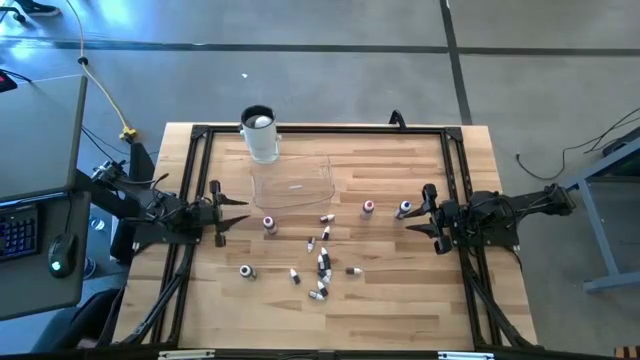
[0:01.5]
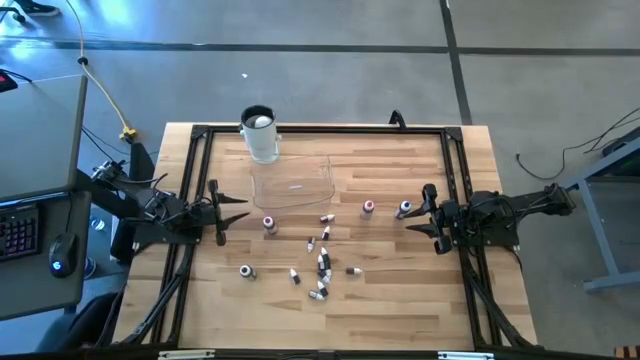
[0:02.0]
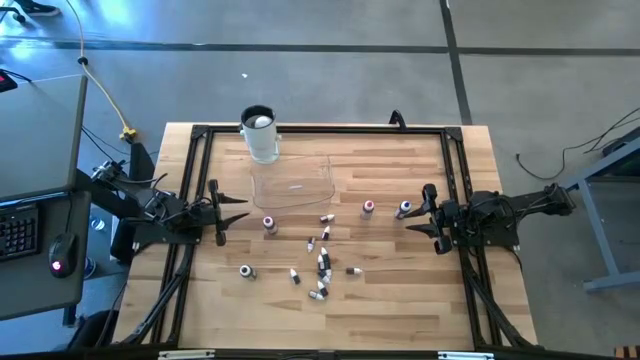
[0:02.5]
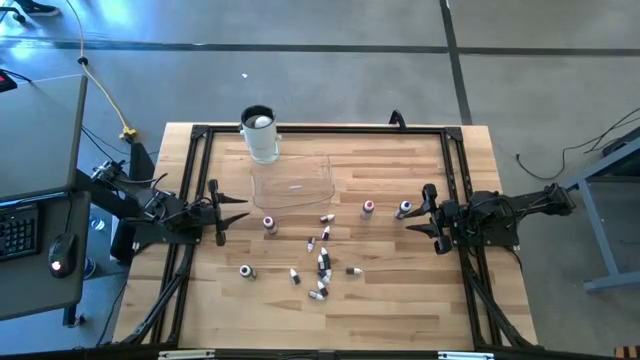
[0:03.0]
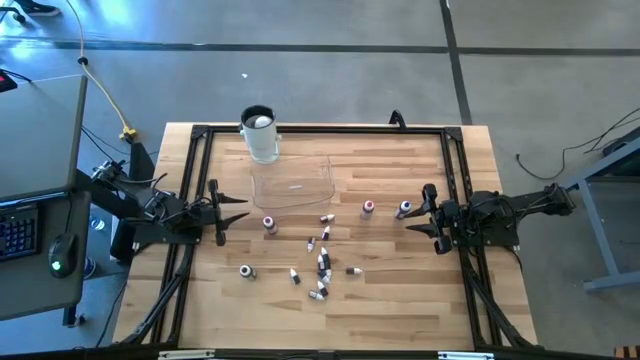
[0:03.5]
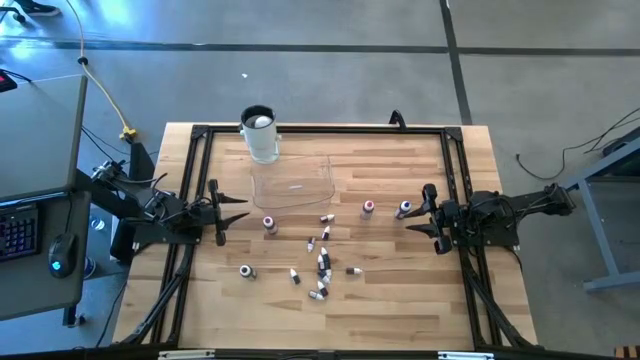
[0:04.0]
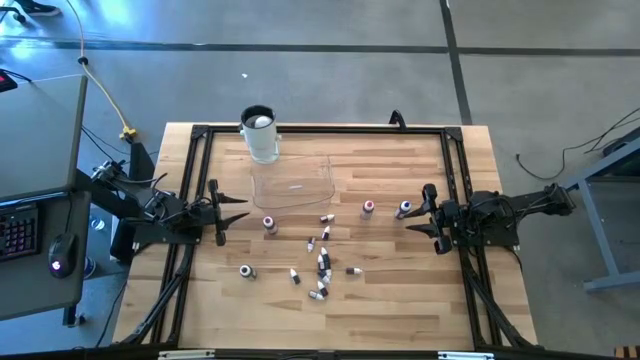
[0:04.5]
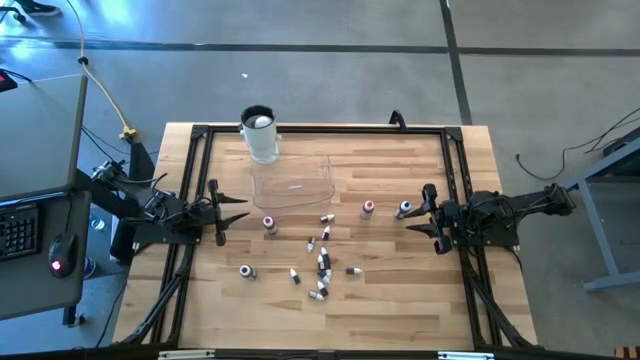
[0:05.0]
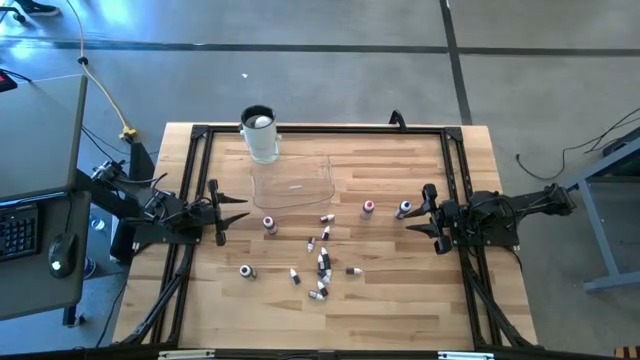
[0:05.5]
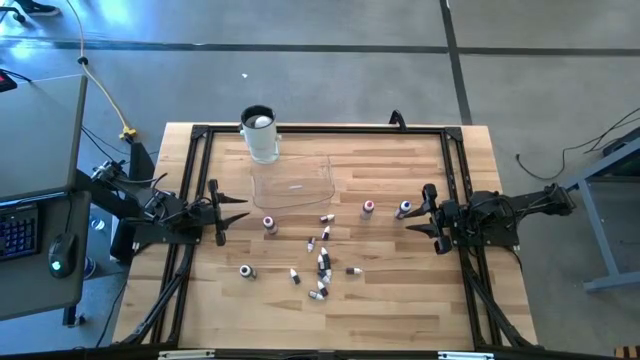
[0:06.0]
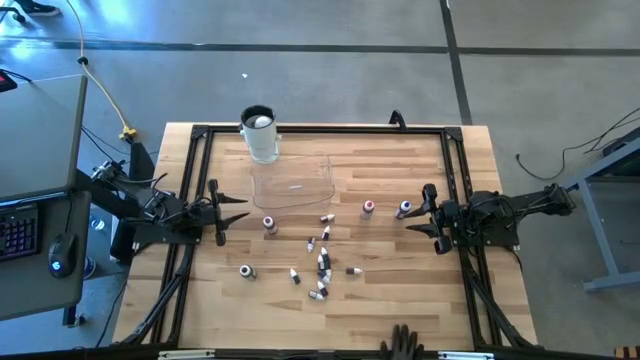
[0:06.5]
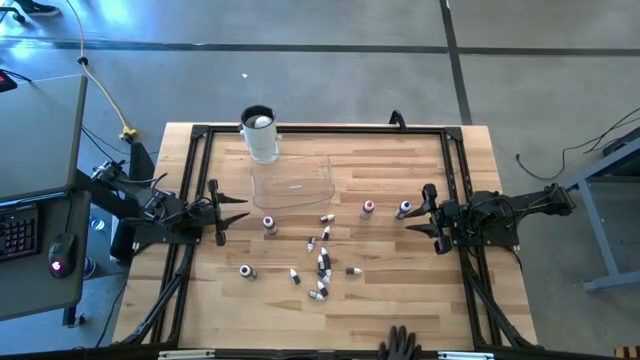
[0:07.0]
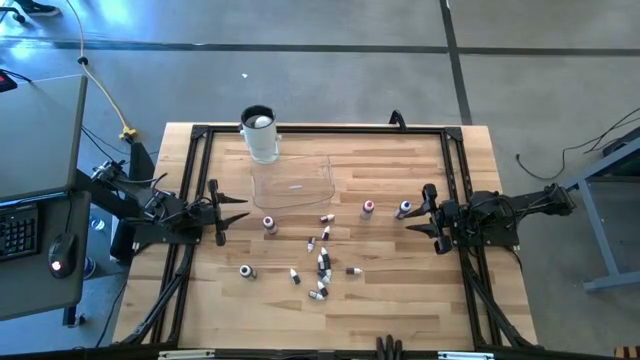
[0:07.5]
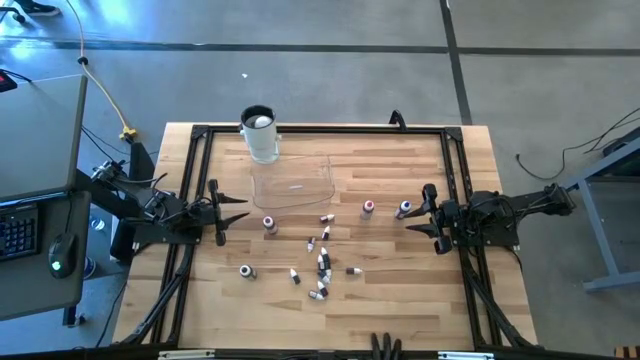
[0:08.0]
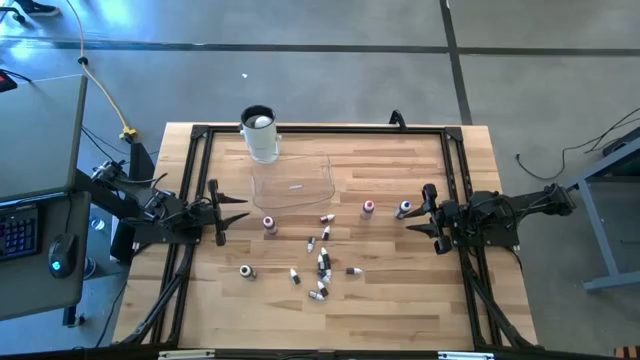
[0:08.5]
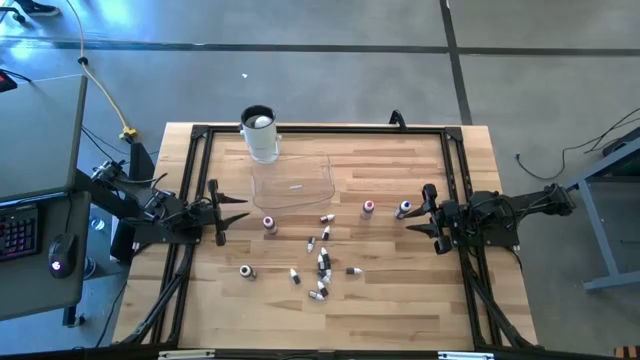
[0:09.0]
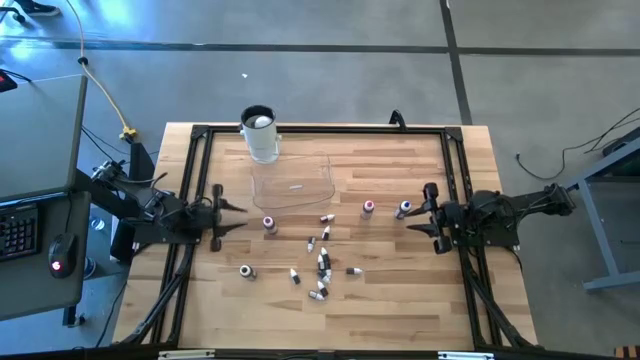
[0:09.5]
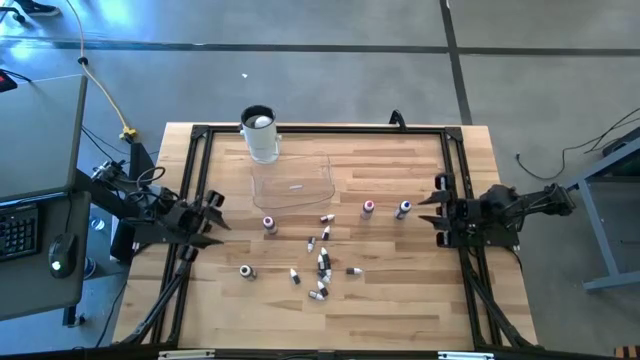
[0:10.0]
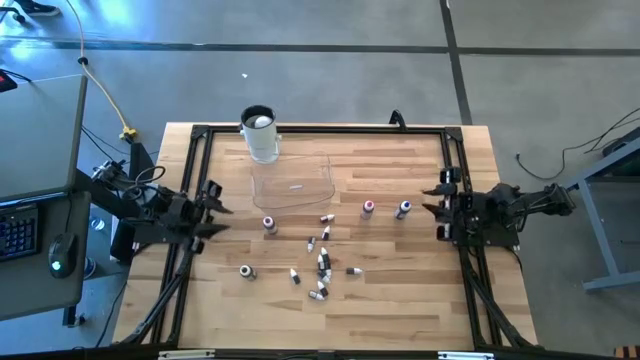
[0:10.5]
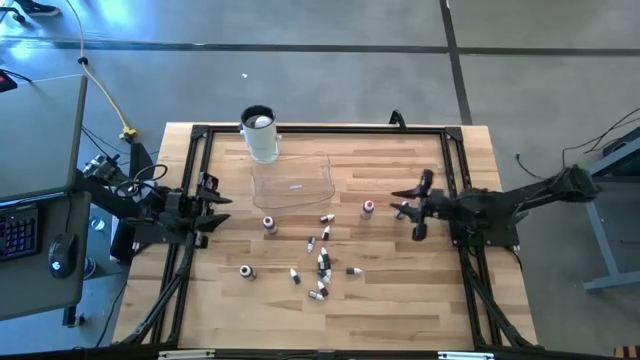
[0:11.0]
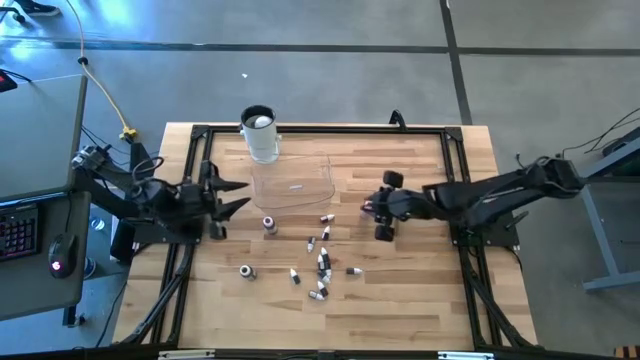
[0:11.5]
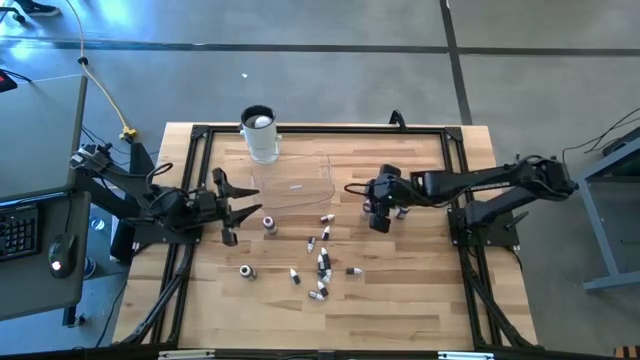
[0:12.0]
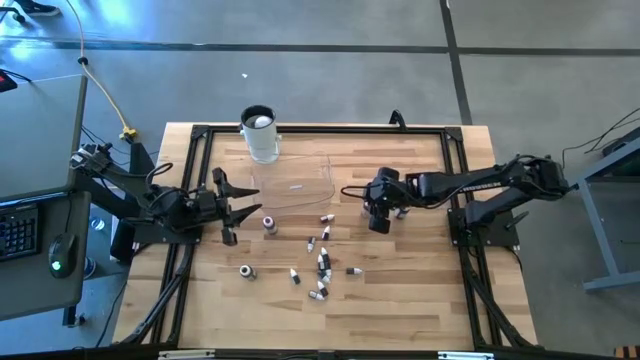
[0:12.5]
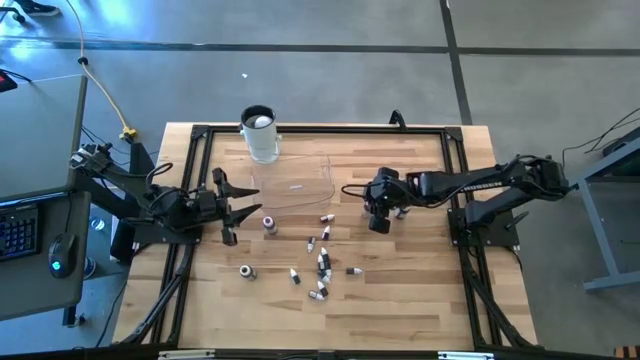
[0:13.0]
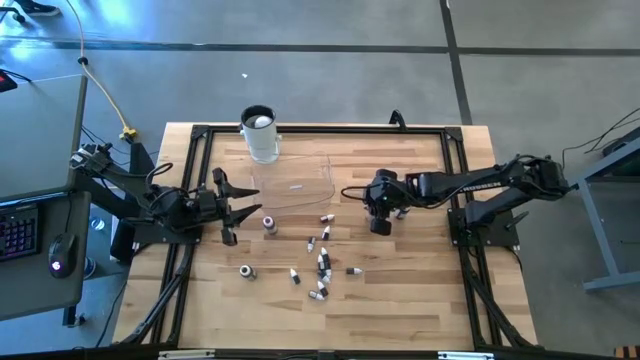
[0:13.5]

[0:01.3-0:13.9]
Task: Pick & Place food coloring
Put the big pink food coloring bottle into the transparent bin

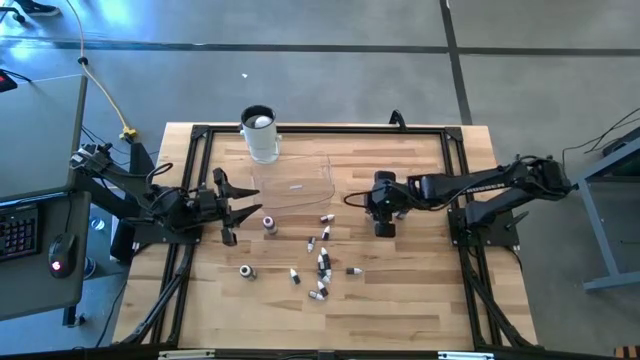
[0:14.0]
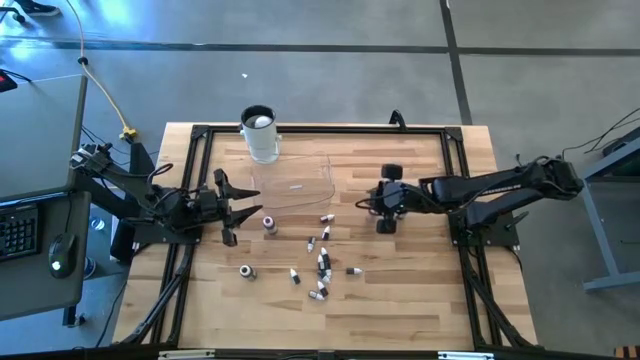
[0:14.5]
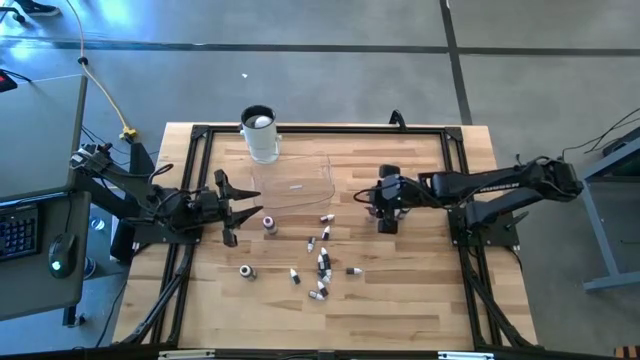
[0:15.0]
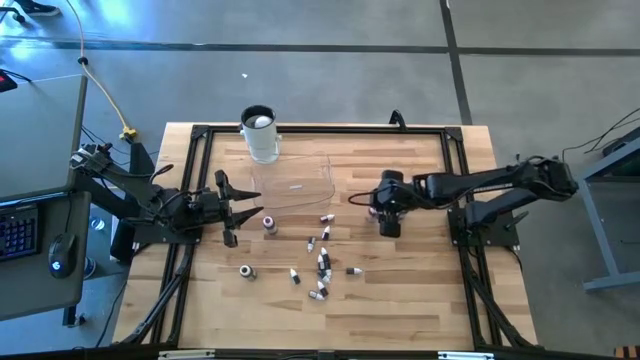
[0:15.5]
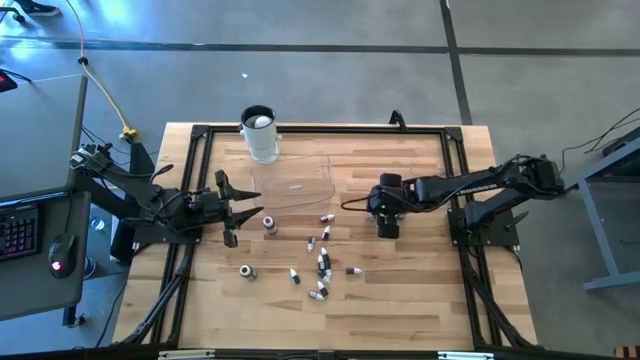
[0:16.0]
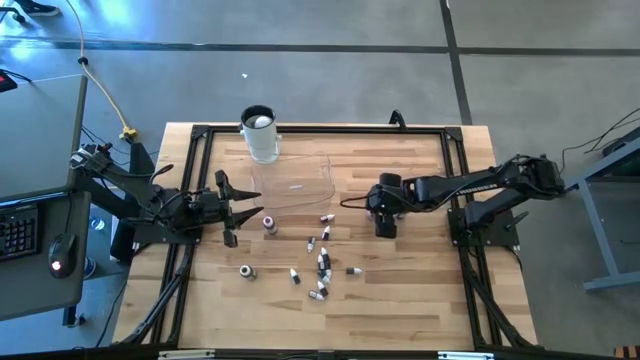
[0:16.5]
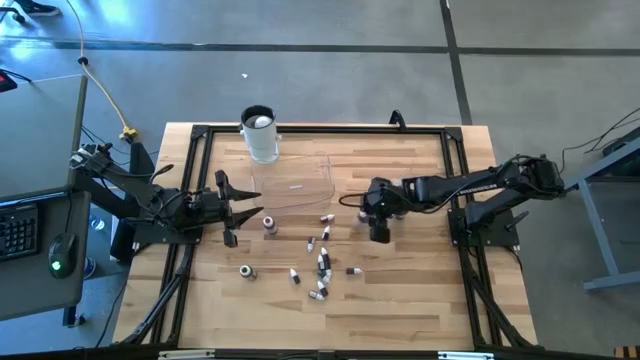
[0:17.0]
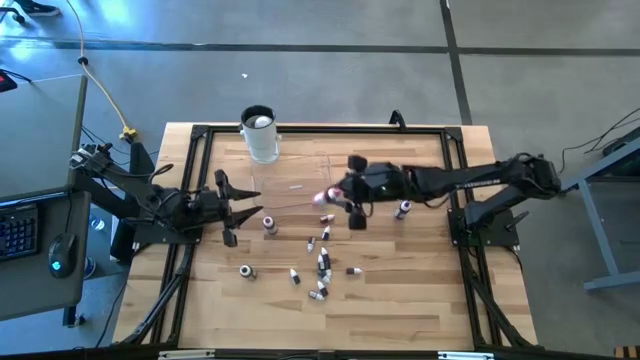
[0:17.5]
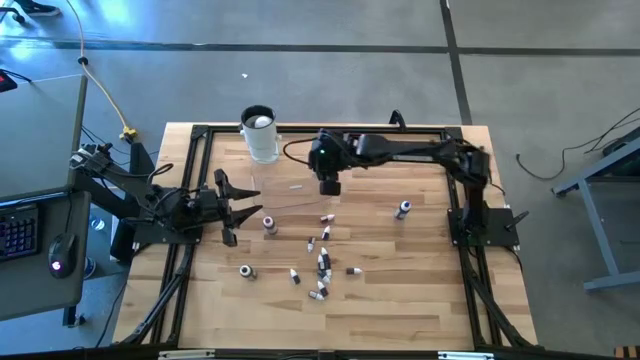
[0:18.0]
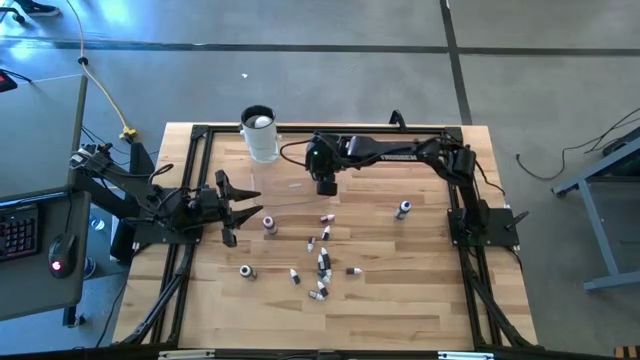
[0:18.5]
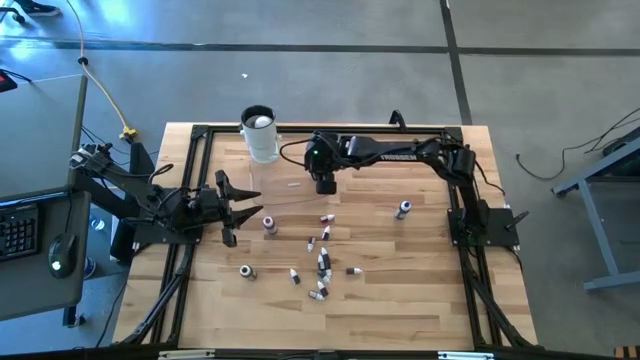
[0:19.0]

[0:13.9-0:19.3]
Put the big pink food coloring bottle into the transparent bin

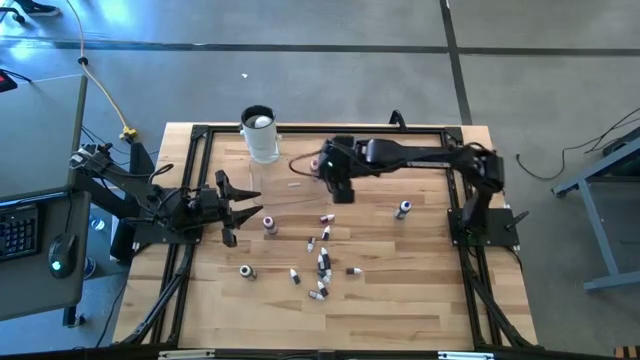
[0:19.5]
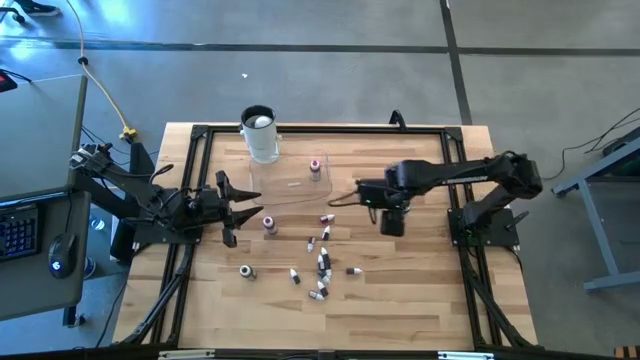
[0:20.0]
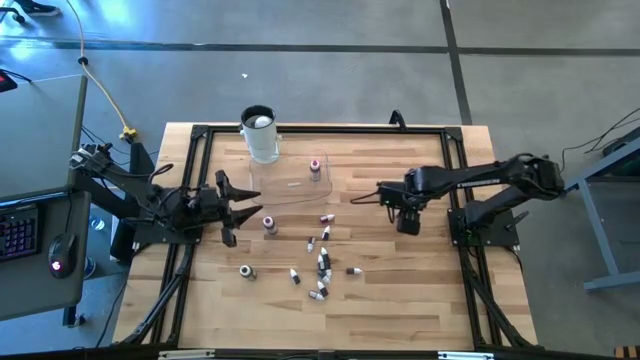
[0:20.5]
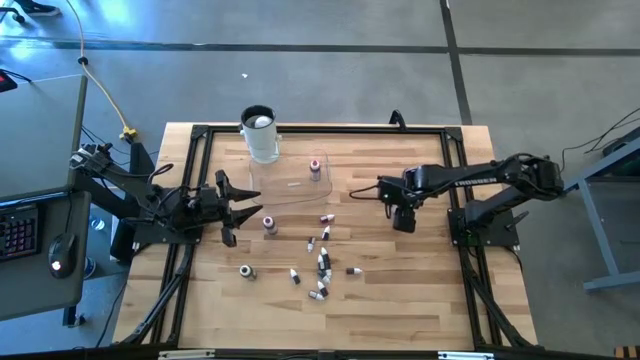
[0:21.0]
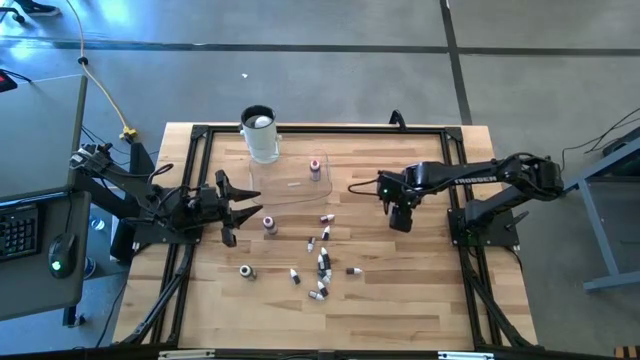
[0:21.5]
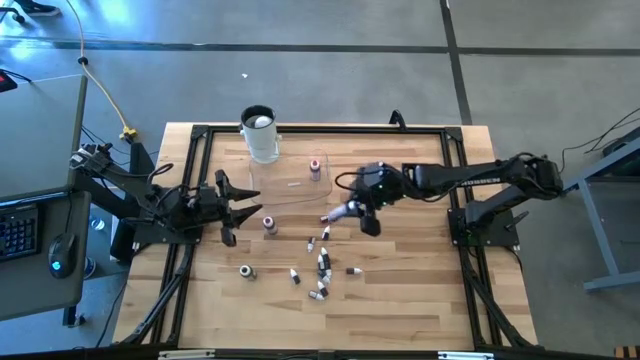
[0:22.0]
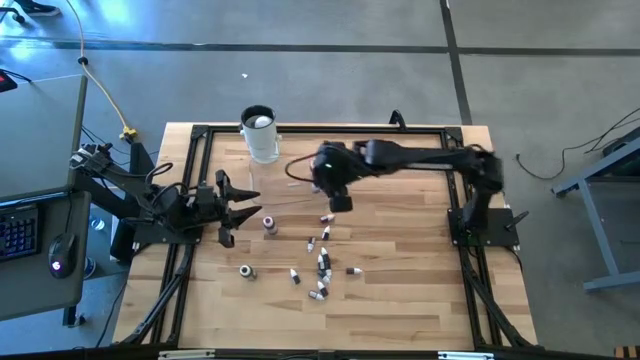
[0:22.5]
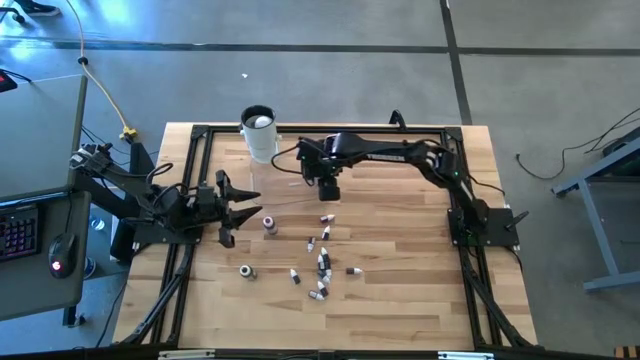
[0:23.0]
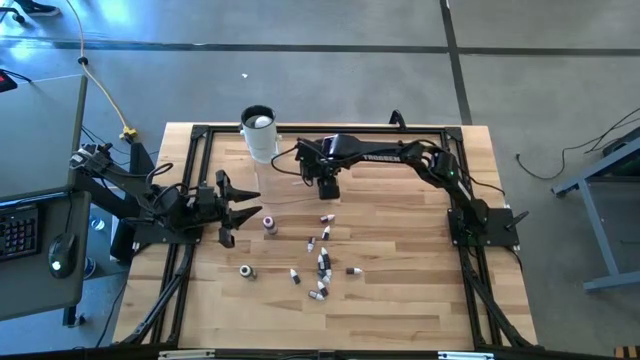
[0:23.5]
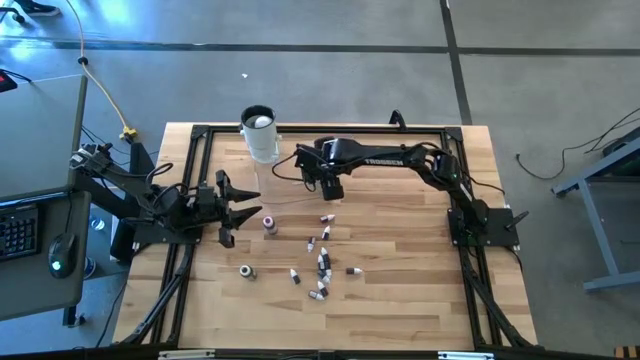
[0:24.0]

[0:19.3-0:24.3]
Put the big blue food coloring bottle into the transparent bin
